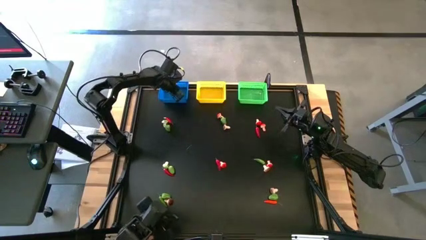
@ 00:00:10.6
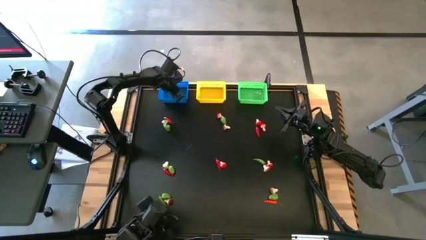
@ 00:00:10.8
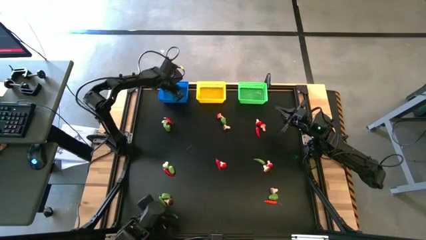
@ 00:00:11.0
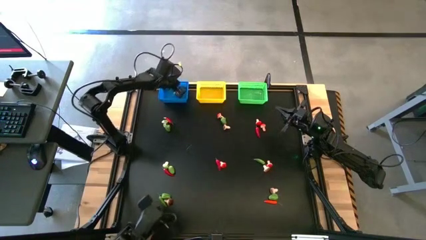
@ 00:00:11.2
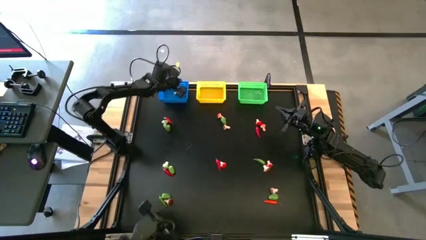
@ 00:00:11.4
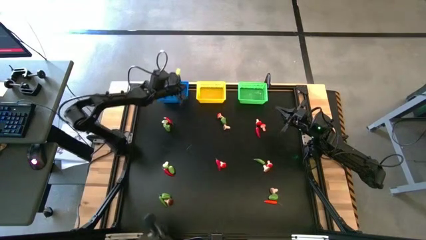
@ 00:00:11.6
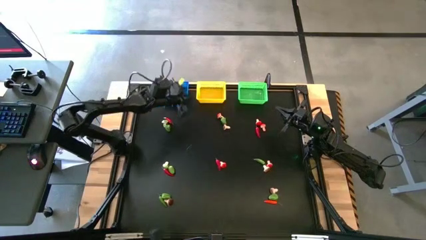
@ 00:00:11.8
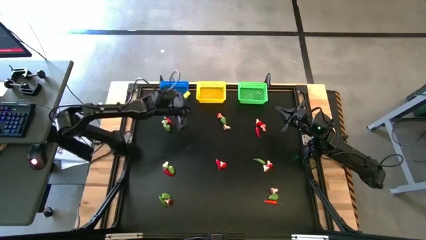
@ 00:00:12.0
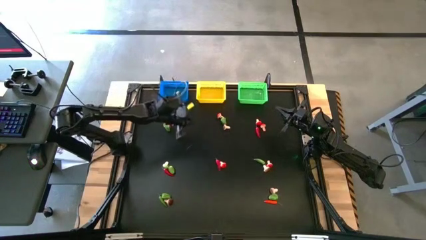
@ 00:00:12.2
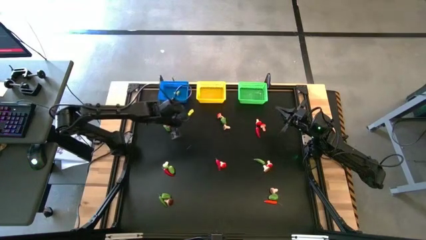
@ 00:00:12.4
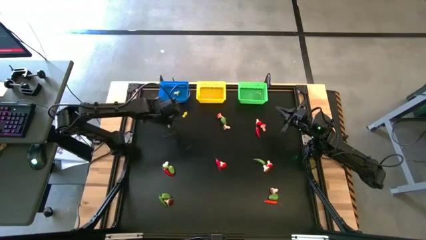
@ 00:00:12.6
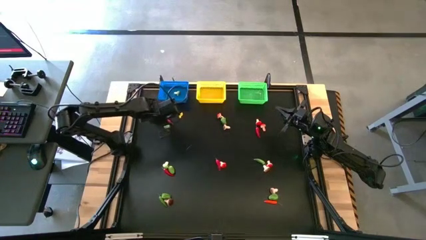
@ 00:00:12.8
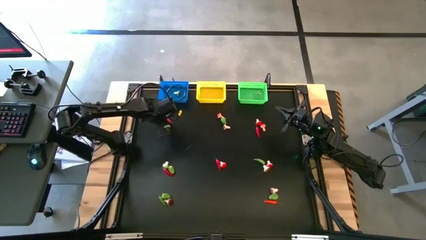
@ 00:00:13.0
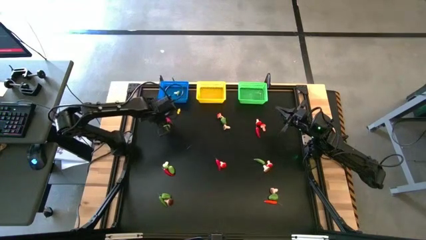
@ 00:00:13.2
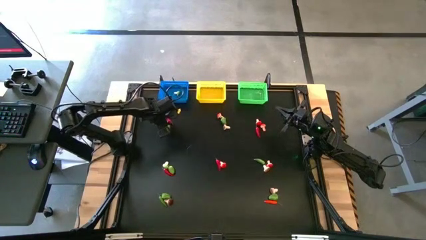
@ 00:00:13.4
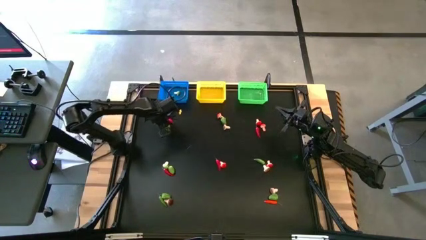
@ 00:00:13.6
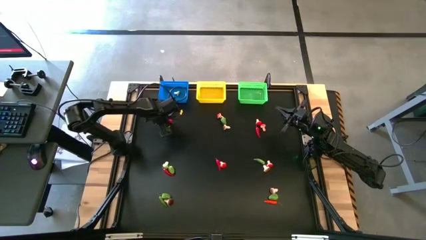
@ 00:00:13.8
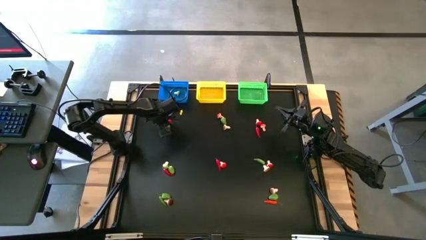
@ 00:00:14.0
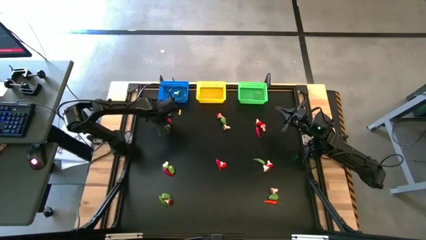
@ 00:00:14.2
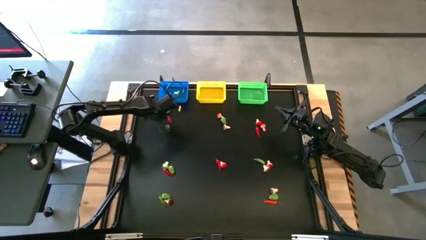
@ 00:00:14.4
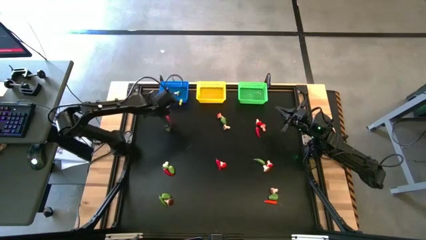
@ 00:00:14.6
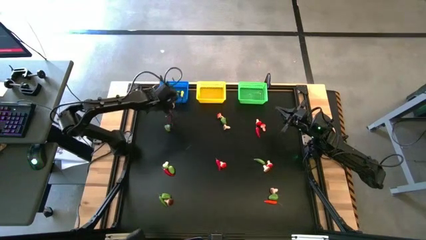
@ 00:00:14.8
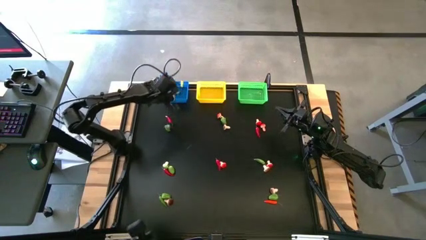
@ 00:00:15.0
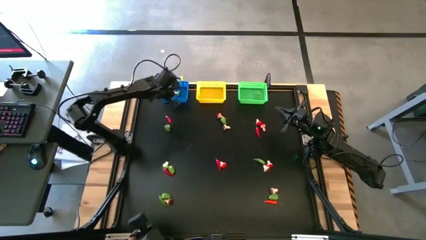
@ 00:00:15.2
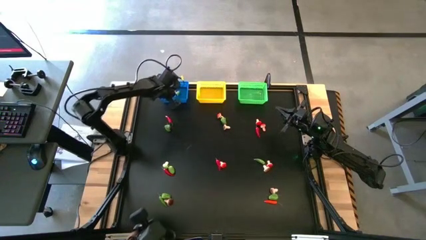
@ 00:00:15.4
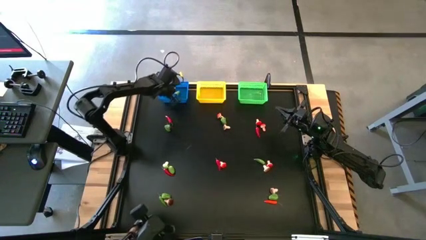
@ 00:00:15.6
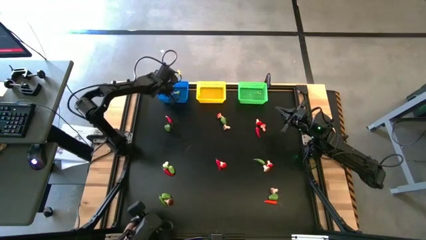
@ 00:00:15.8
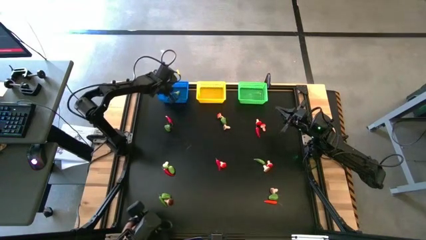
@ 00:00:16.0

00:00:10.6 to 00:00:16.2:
Task: Sort produce into baskets
Put the green mushroom into the blue bin

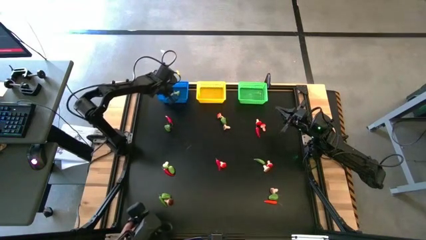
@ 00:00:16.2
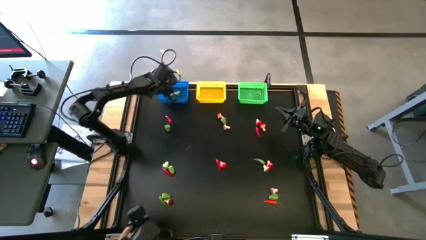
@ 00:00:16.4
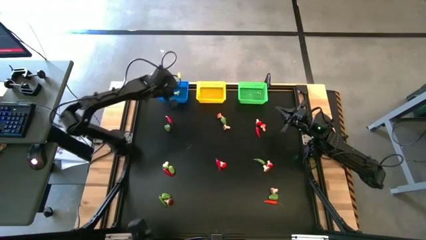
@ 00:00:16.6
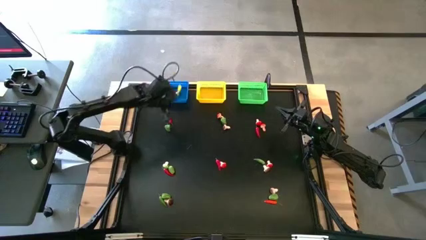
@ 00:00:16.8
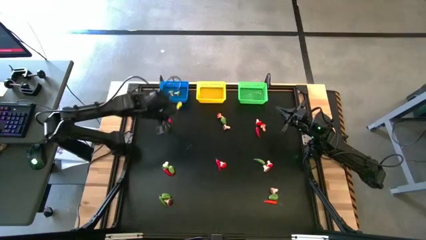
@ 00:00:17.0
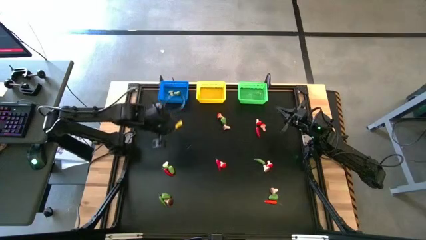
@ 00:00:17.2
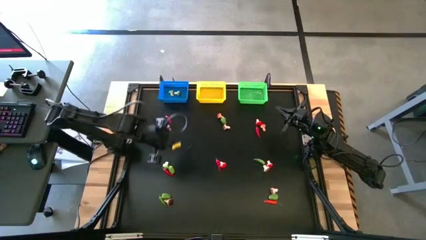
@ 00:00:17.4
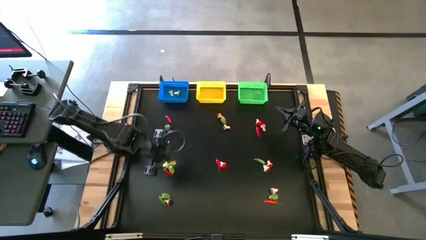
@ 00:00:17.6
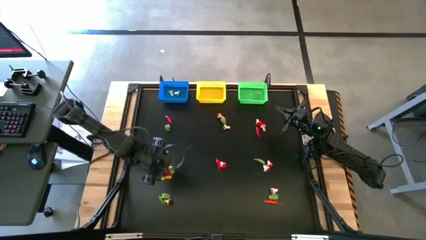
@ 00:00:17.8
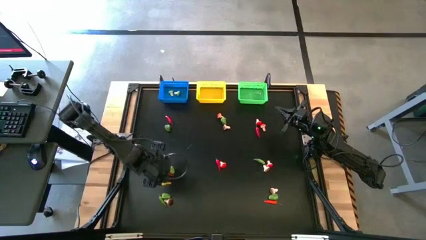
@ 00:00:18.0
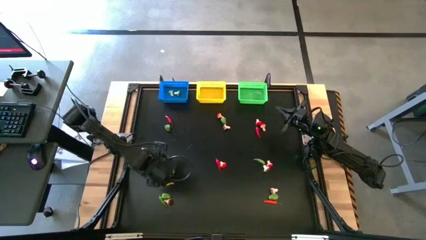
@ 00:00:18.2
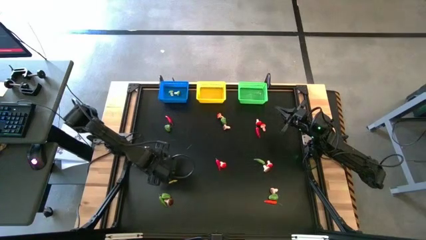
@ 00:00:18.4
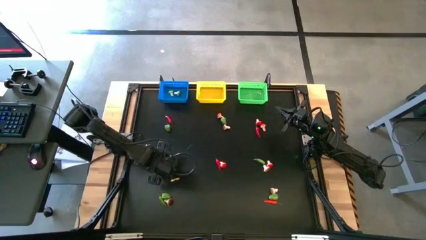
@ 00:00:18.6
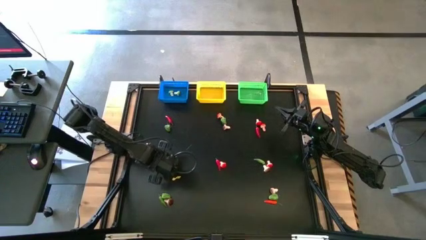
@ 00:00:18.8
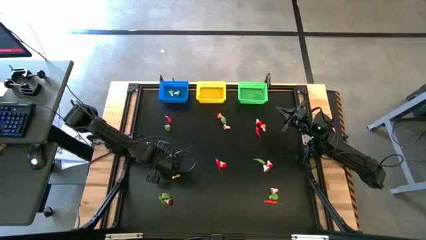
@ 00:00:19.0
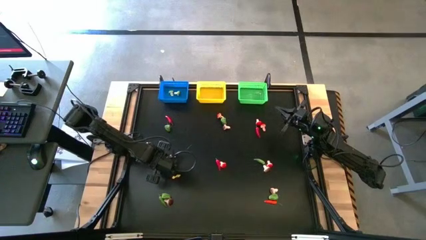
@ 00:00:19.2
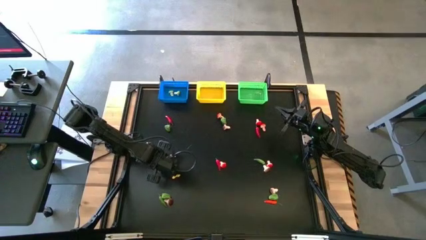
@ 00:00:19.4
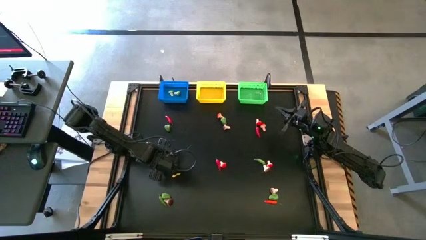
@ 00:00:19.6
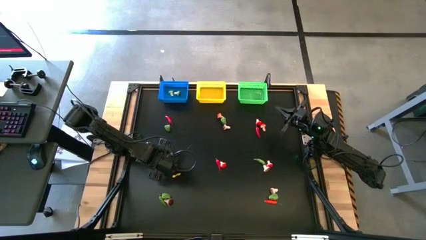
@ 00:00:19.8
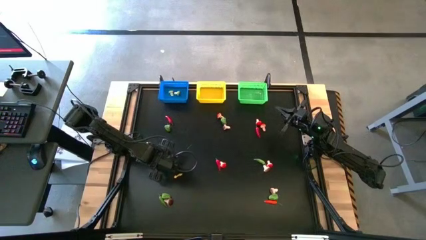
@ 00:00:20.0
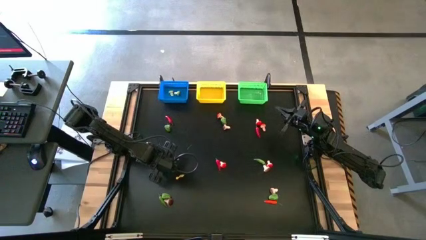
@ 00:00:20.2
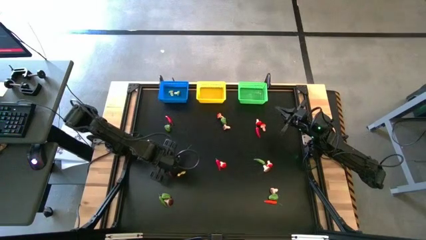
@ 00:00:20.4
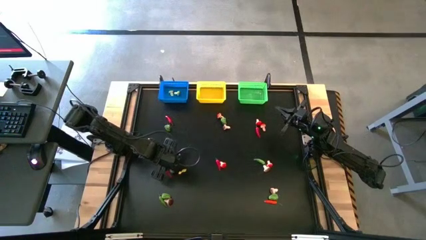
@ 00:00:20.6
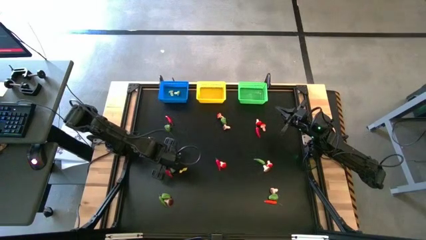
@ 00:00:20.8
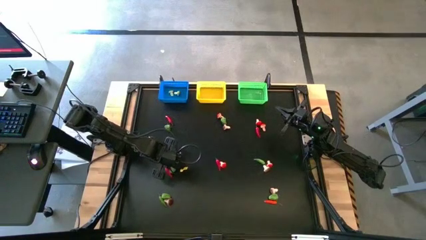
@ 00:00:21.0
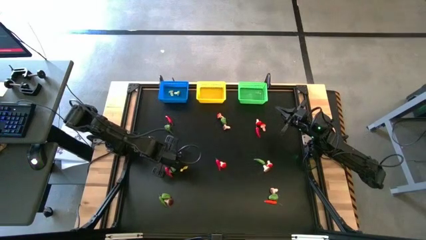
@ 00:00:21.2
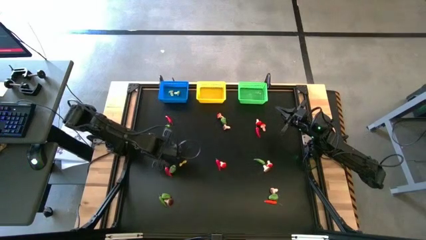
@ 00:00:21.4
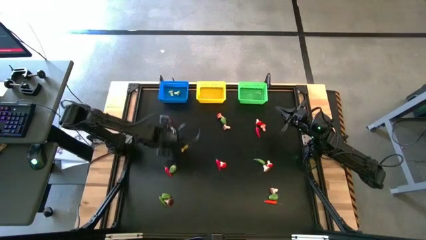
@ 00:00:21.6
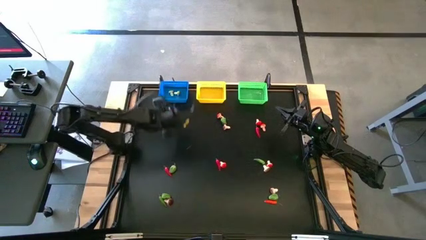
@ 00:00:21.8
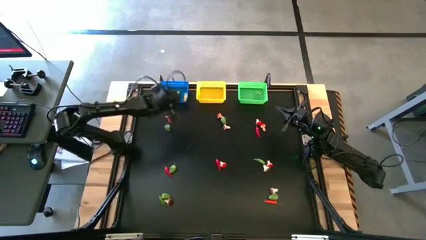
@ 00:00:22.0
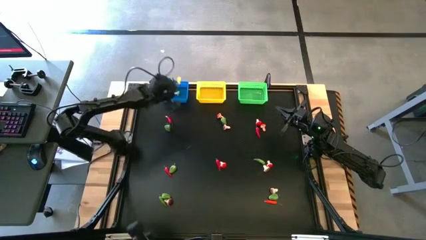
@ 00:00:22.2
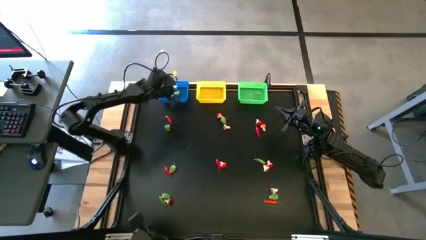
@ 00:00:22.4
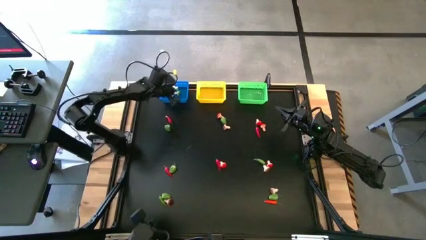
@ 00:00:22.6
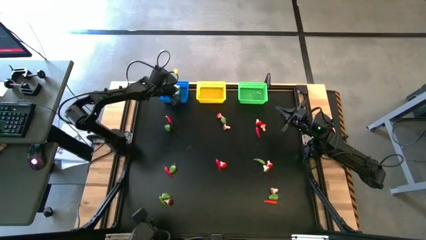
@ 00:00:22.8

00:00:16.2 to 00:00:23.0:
Put the green mushroom into the blue bin

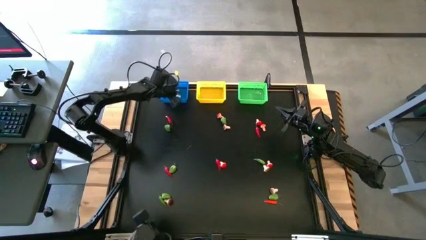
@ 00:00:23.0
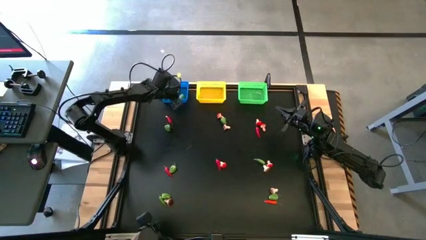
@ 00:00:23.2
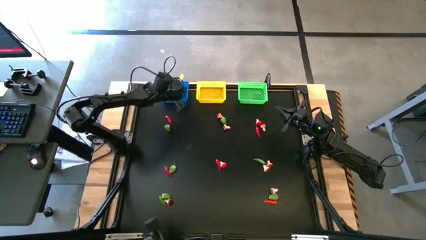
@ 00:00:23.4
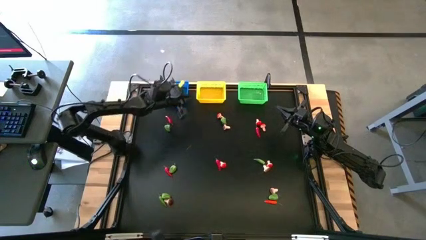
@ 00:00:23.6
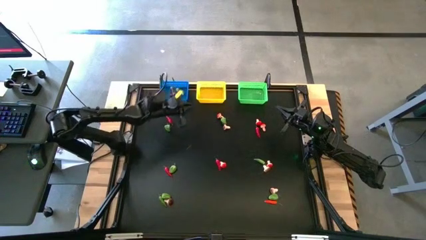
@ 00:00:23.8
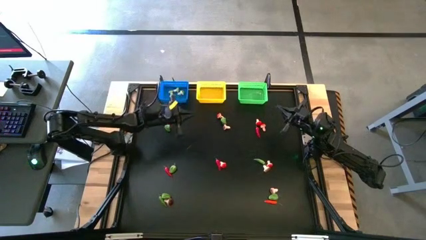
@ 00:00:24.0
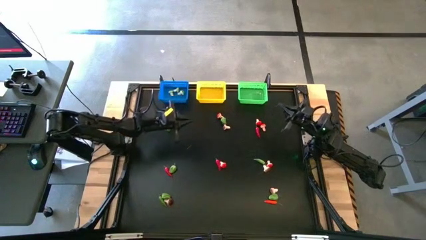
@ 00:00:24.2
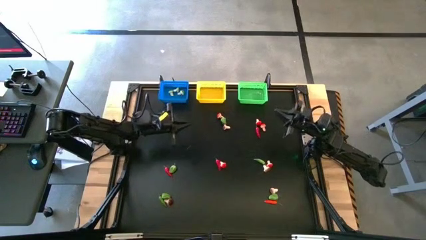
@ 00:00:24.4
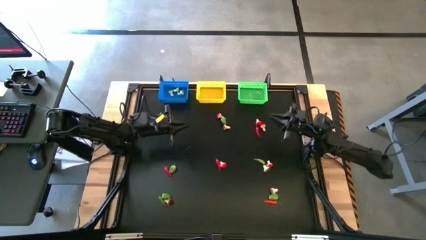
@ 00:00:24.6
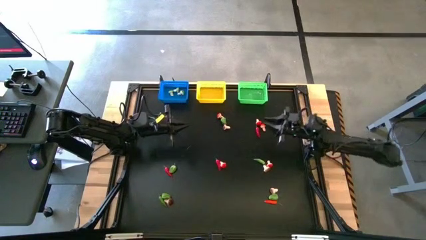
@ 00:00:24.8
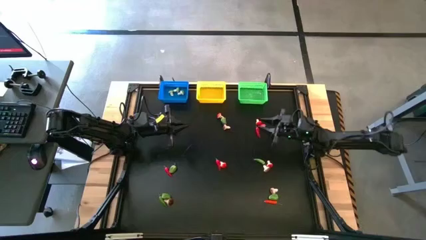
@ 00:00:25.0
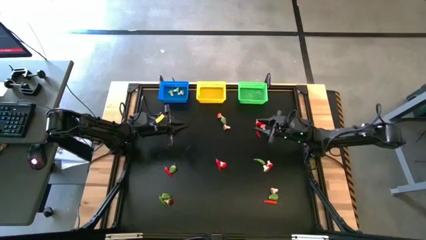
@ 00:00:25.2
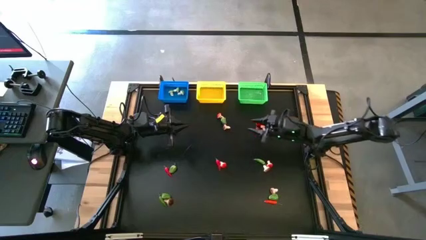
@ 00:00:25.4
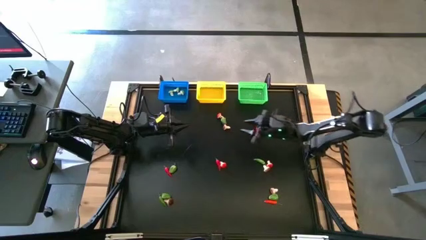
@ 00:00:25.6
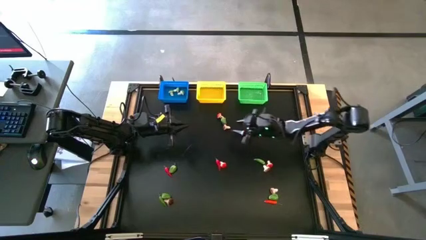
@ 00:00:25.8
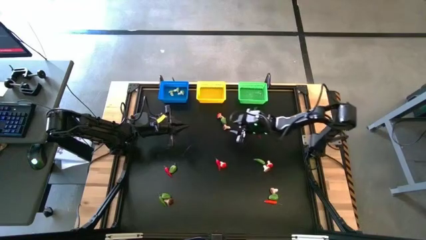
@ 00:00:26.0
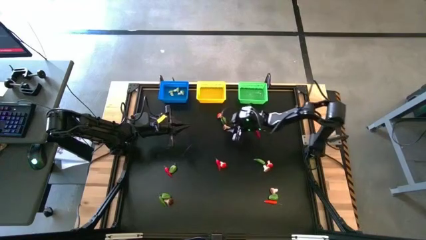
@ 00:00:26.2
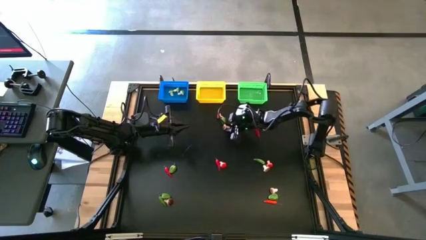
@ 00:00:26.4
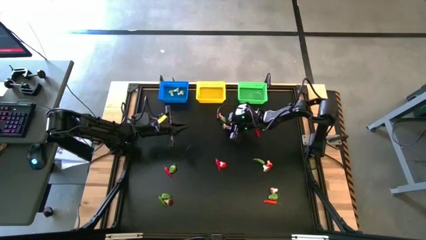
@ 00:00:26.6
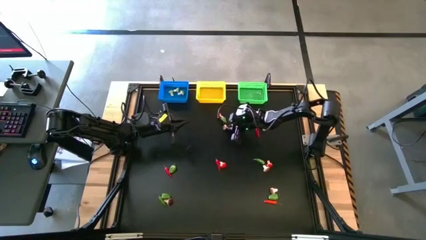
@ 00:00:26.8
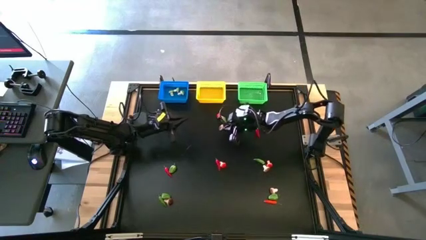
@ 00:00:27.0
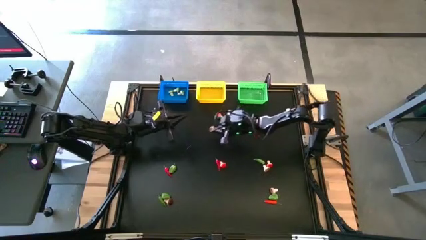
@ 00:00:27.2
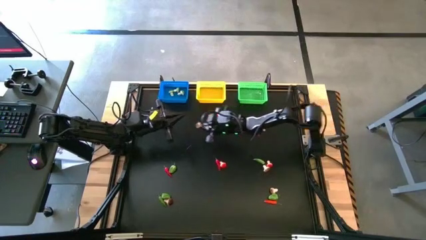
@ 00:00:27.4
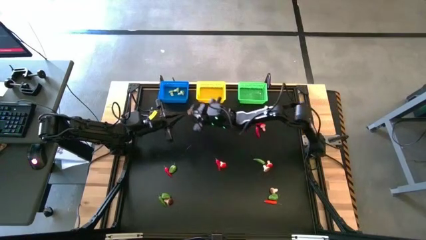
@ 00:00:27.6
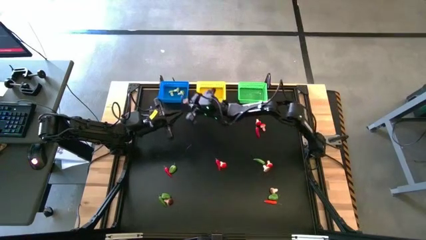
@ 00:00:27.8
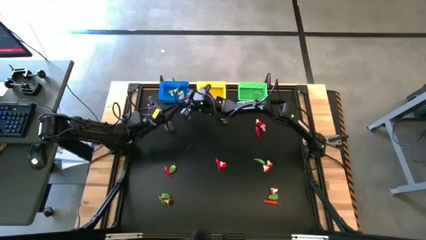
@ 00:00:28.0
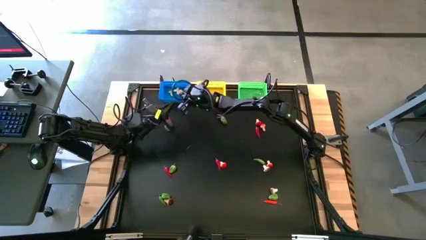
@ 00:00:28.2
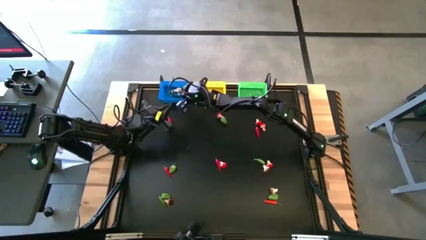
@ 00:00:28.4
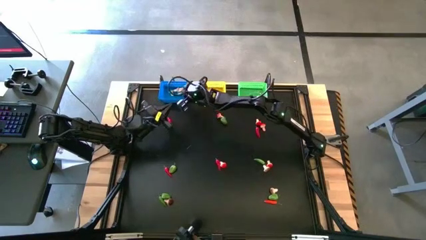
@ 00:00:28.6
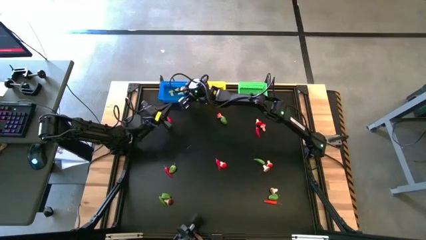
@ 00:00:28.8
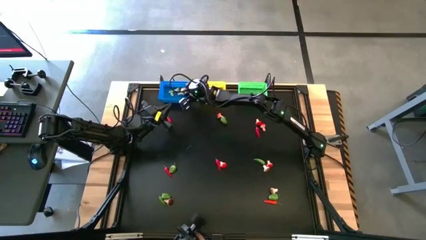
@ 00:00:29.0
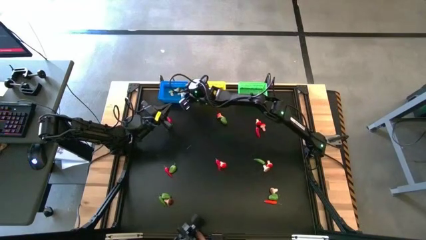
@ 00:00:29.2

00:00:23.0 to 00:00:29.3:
Put the brown mushroom into the blue bin
